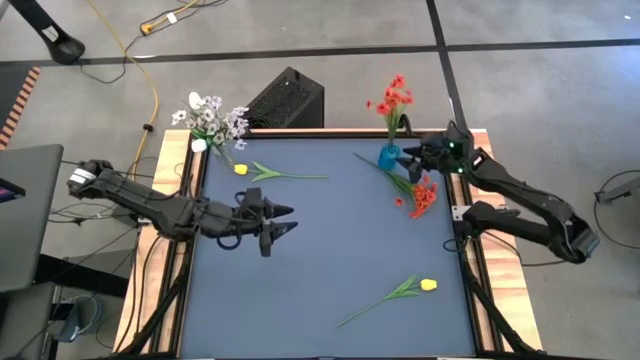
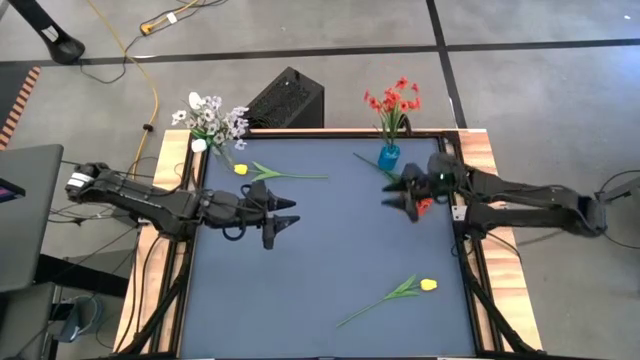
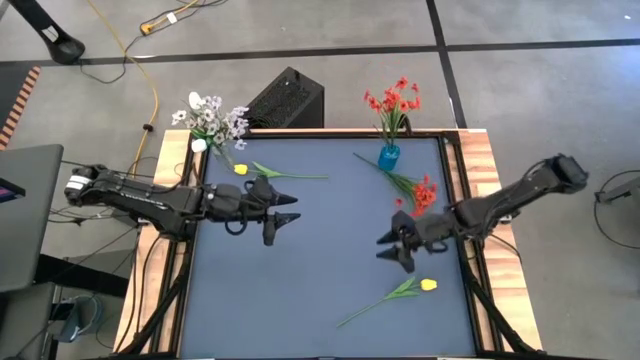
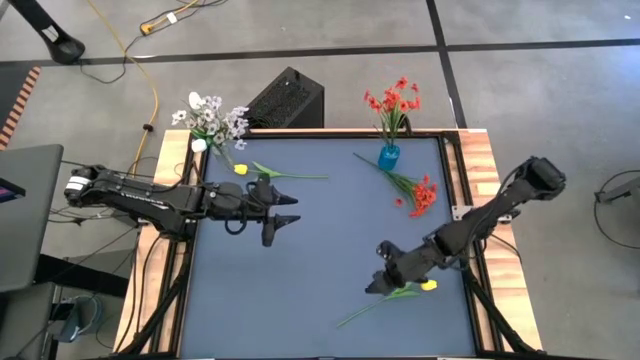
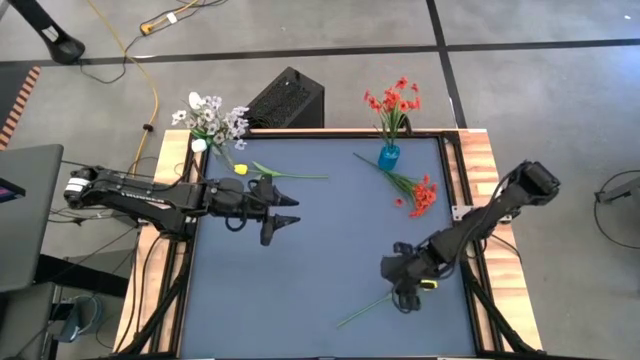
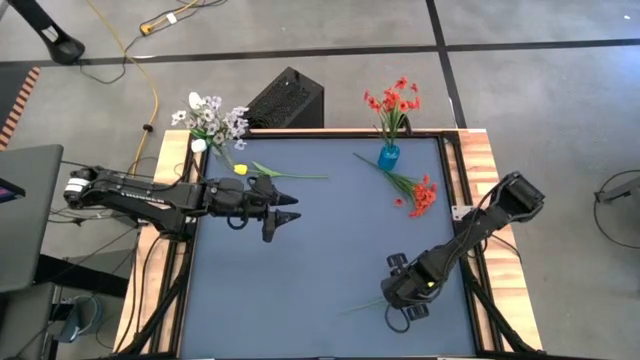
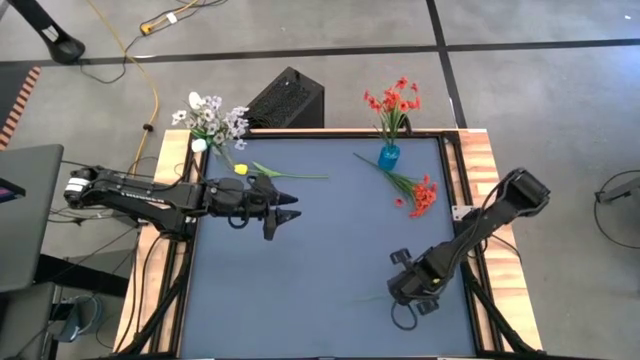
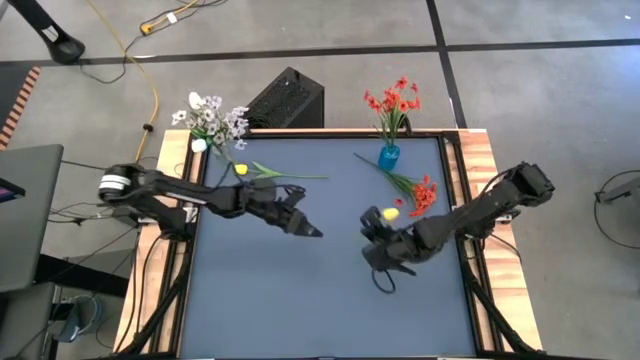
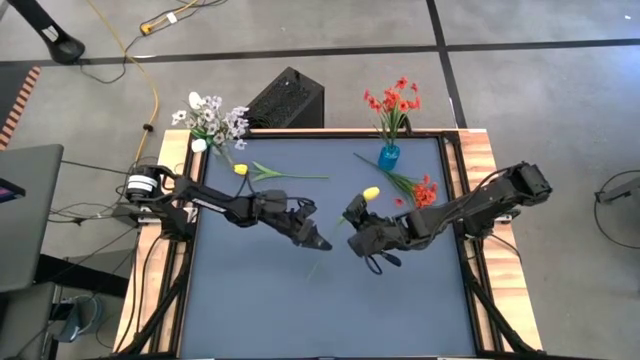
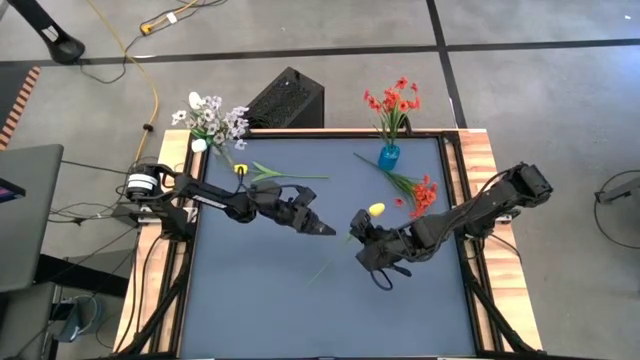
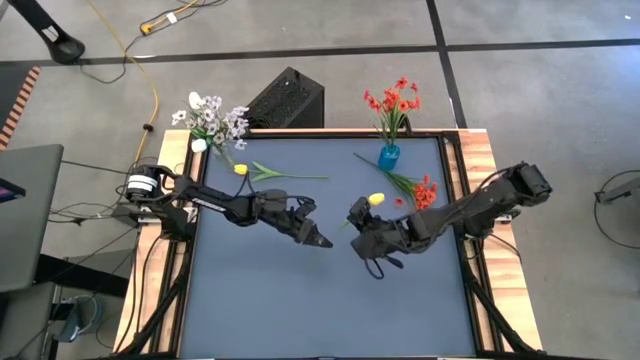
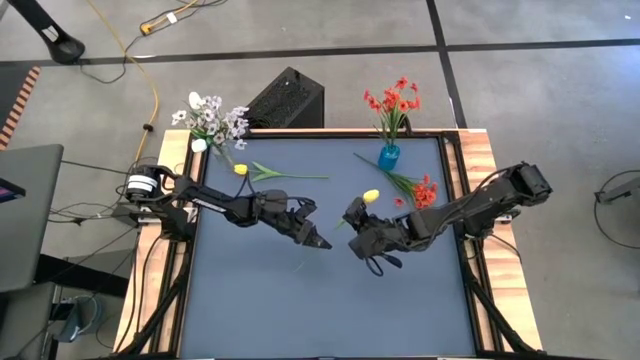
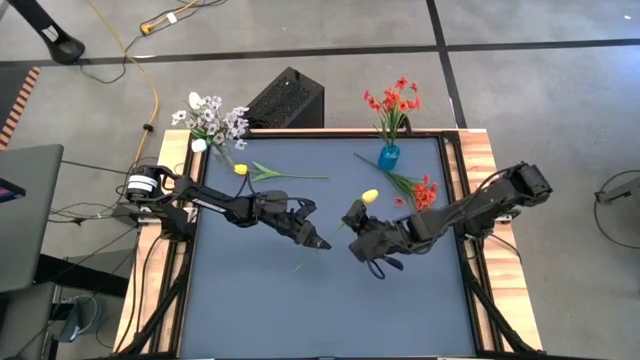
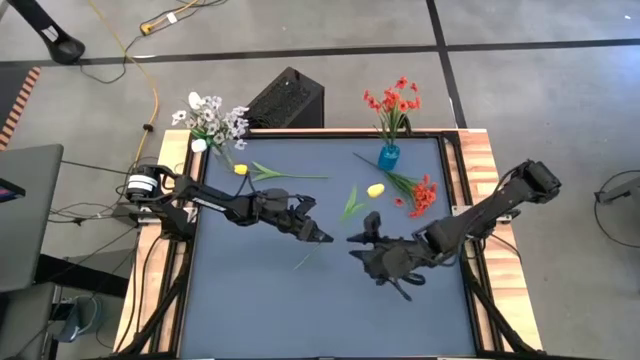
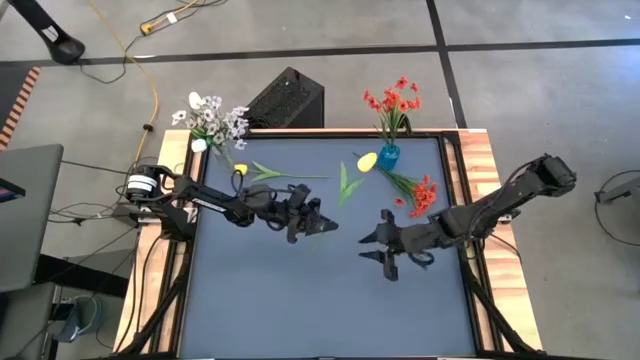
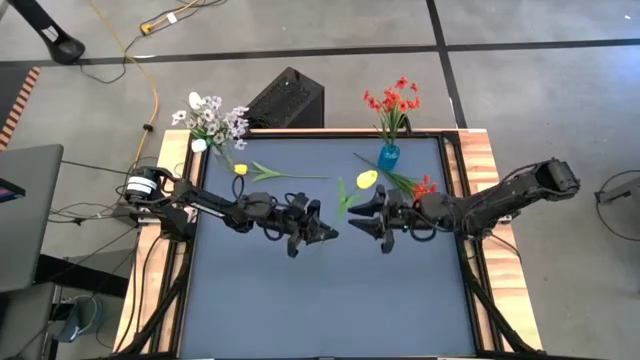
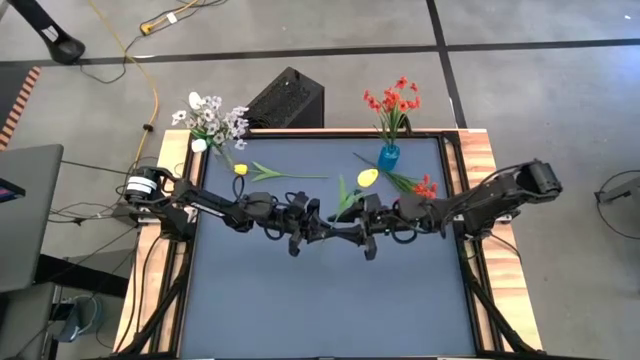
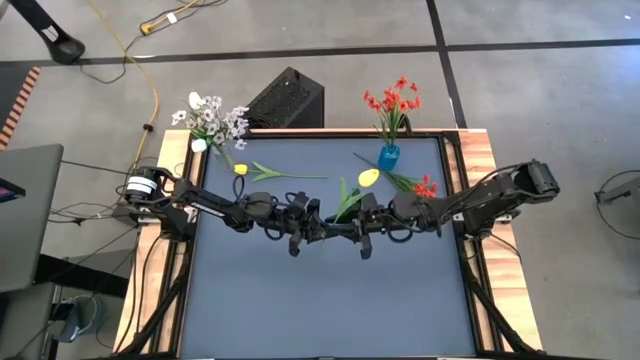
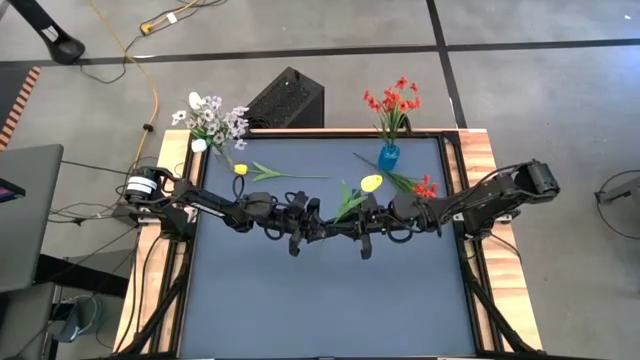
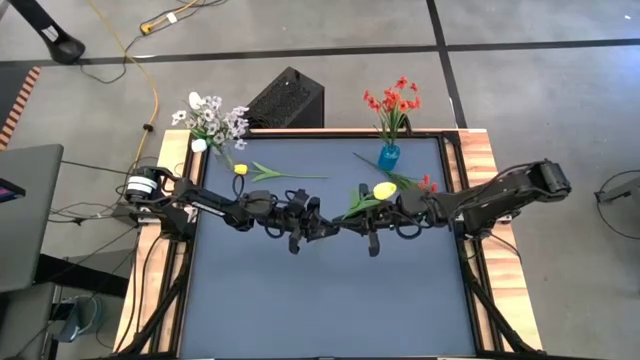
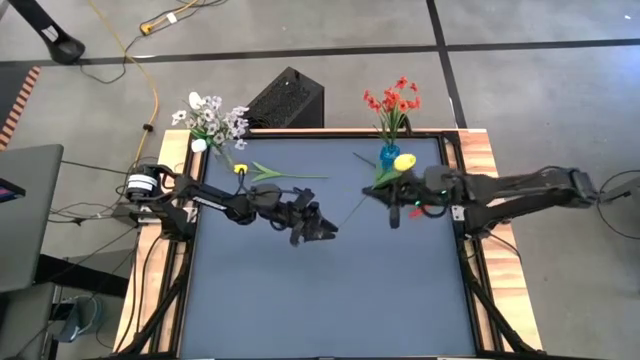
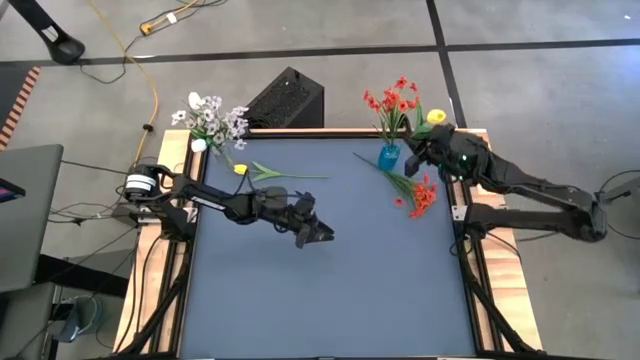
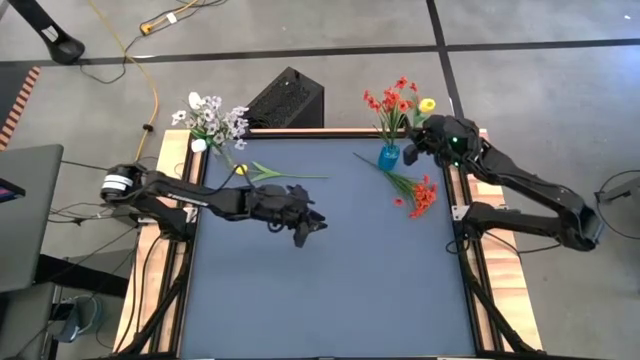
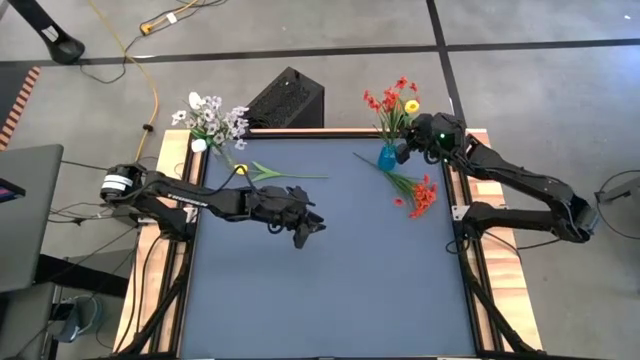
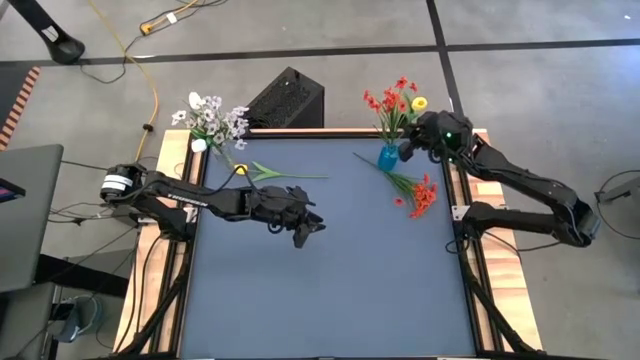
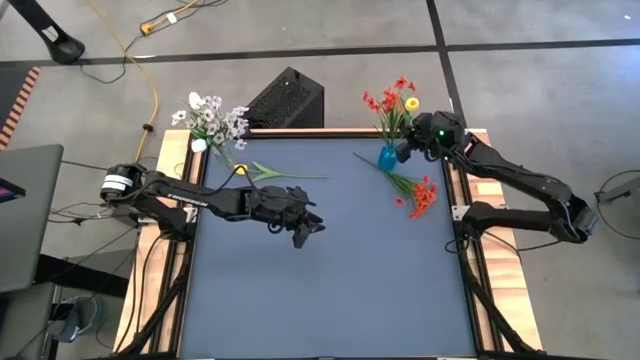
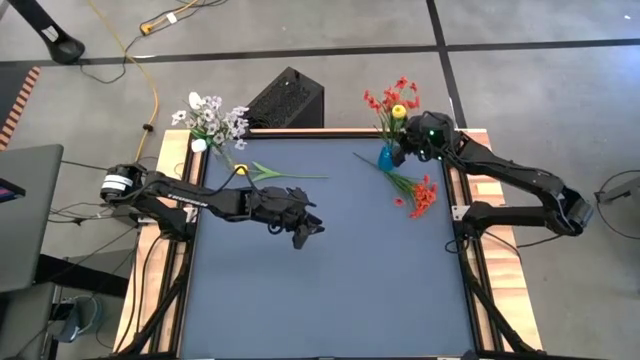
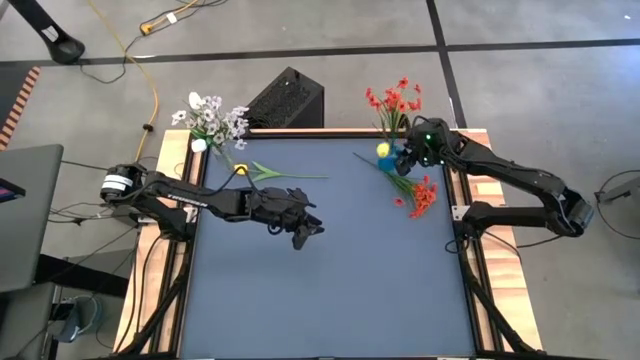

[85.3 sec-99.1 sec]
Task: Sort flowers into vase by color
Put the bottom yellow flower into the blue vase

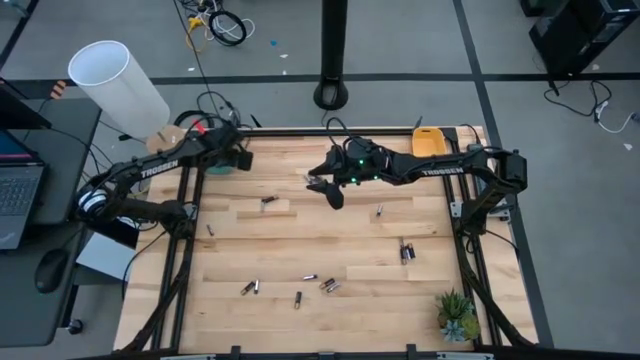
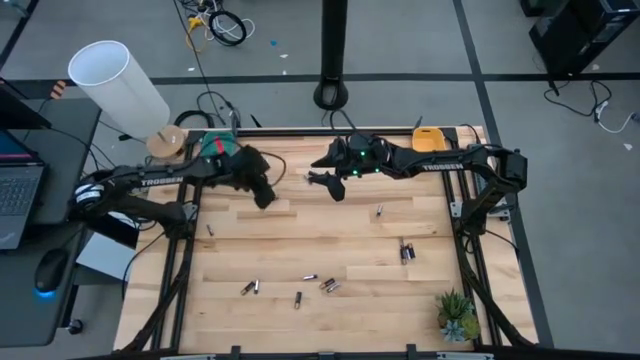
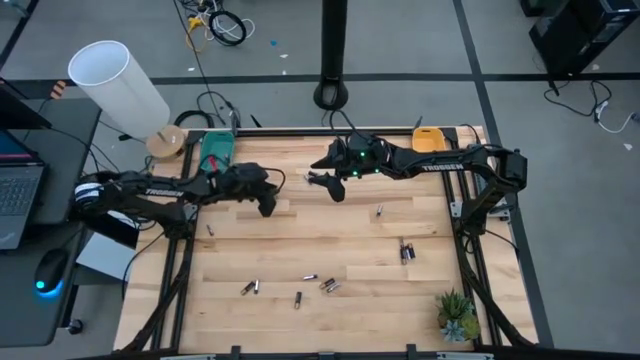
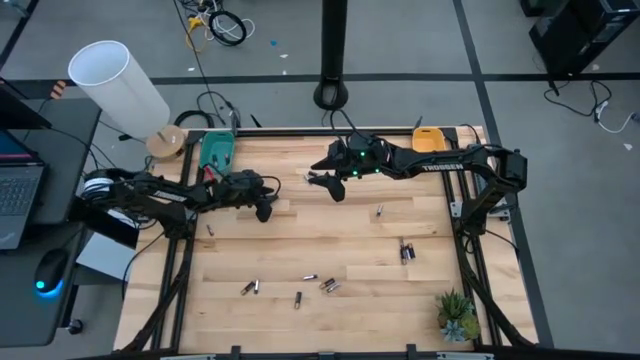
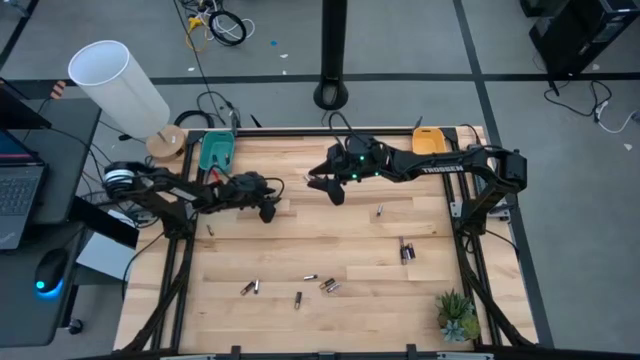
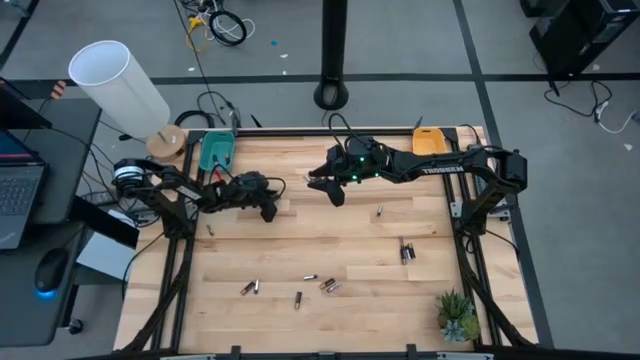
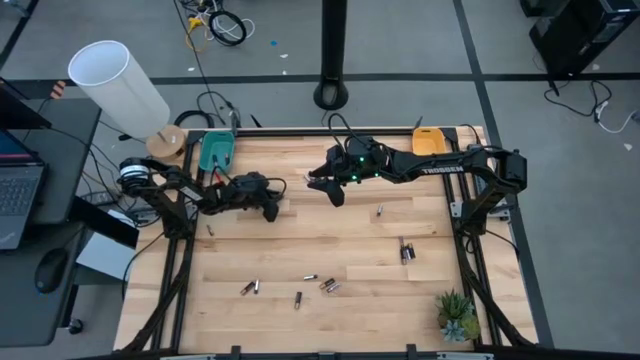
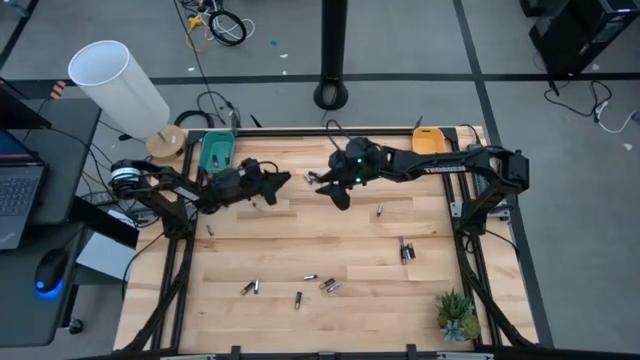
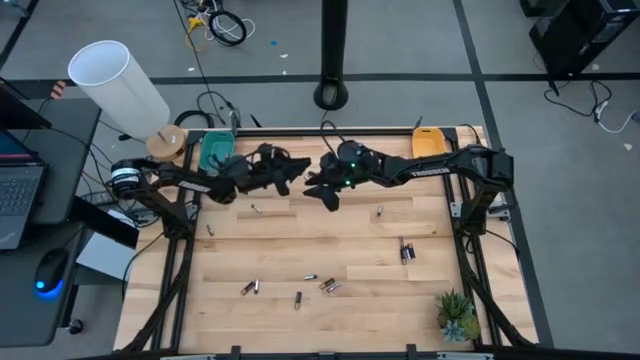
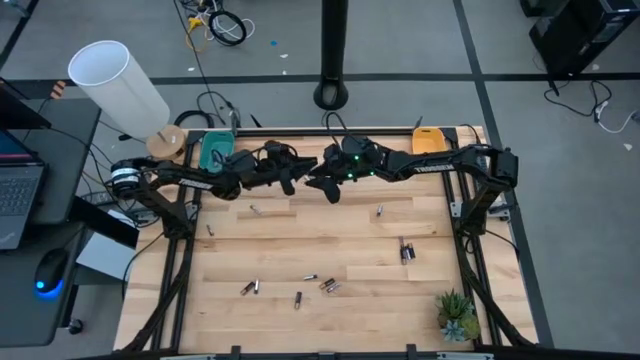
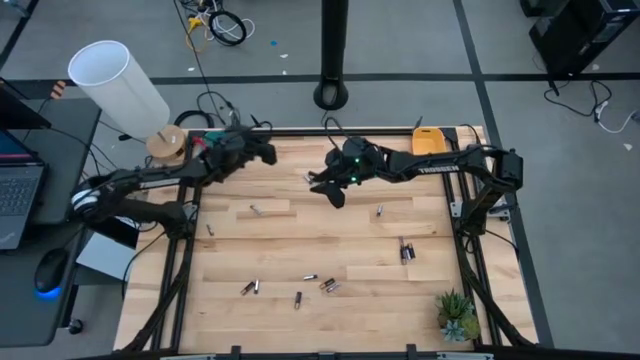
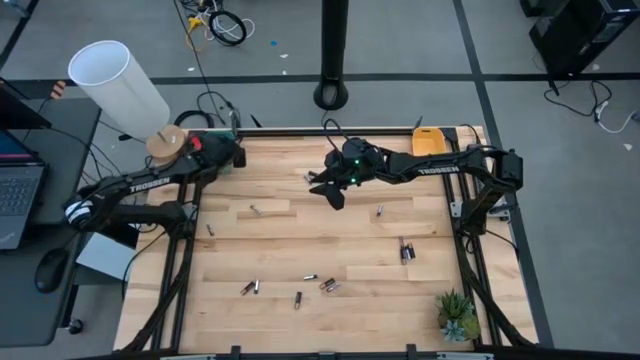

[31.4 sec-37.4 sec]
Task: Sort batteries
Put the black battery into the blue bin
